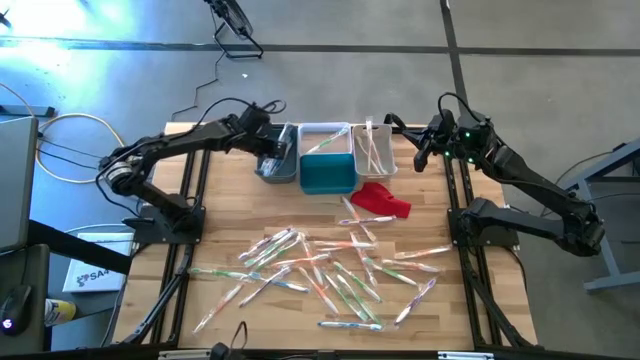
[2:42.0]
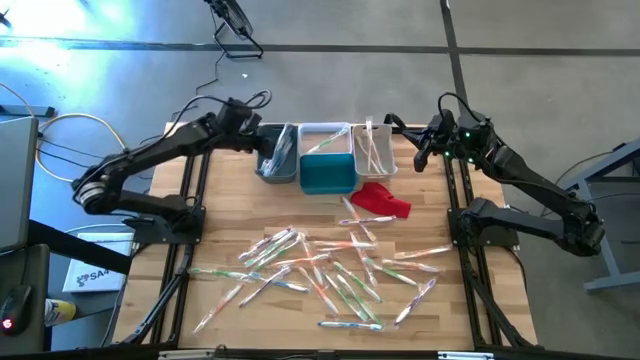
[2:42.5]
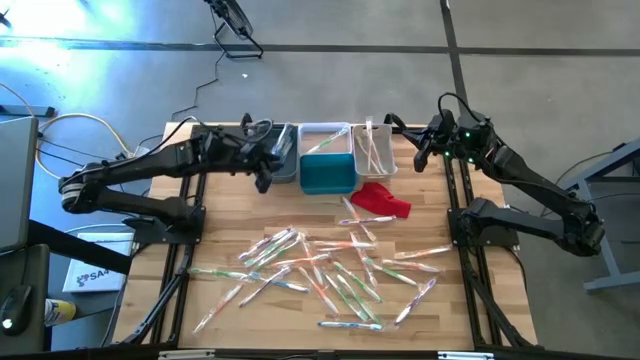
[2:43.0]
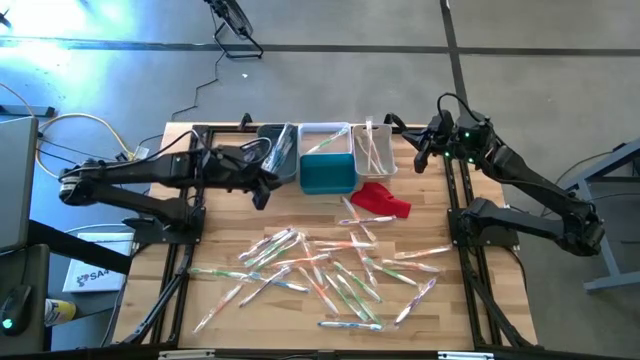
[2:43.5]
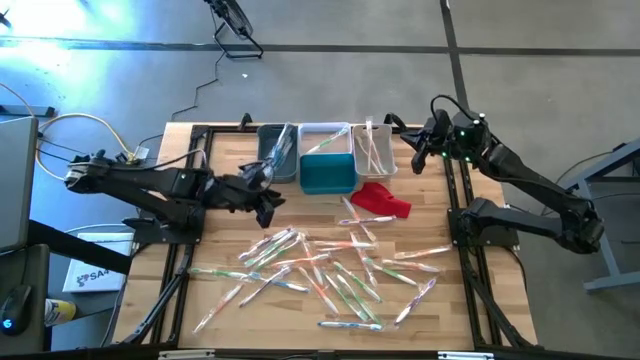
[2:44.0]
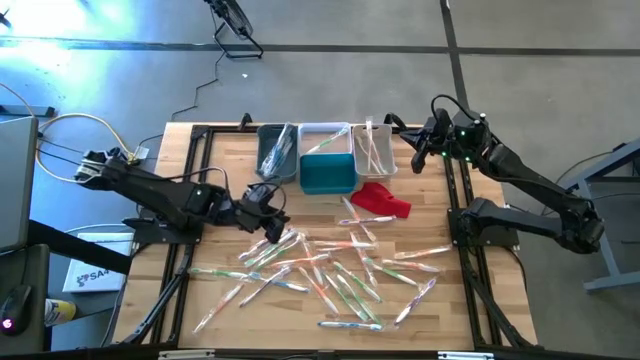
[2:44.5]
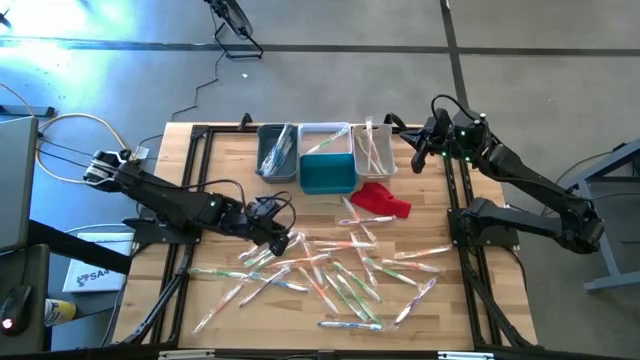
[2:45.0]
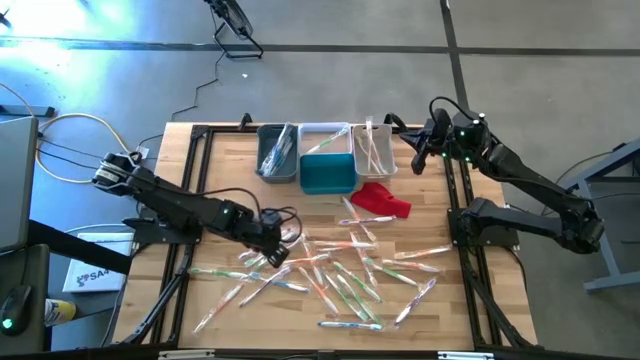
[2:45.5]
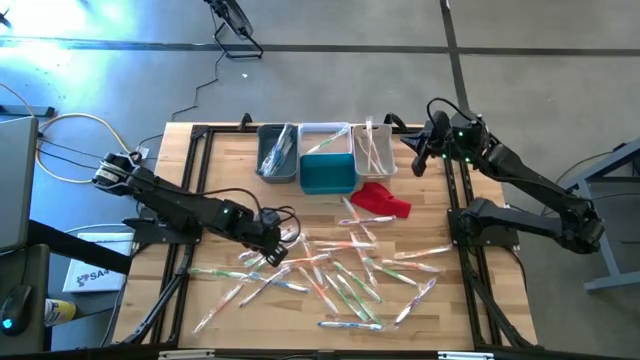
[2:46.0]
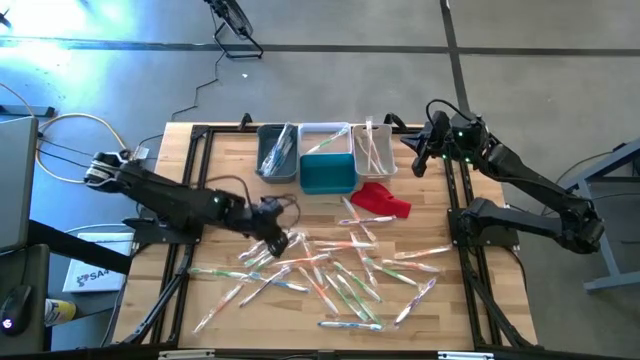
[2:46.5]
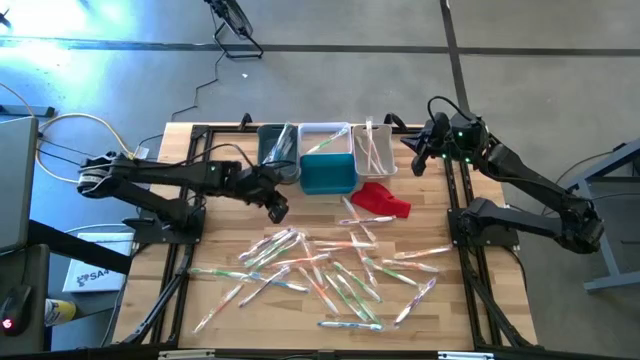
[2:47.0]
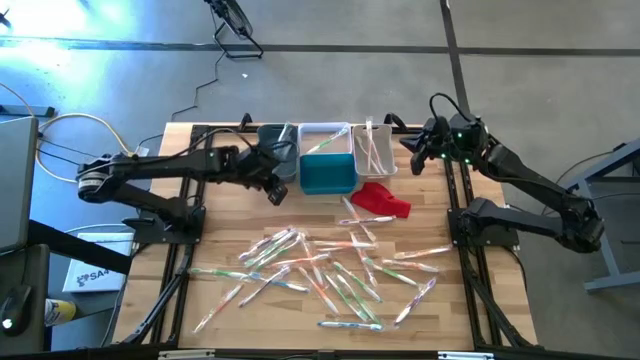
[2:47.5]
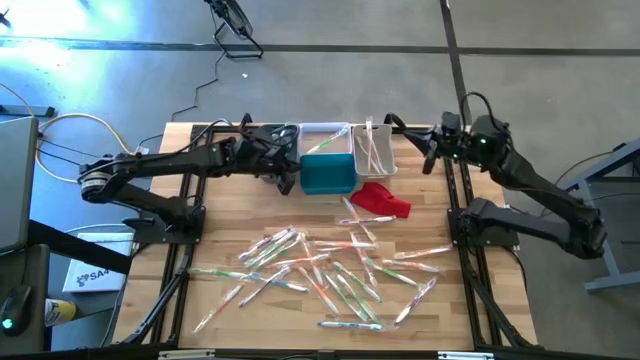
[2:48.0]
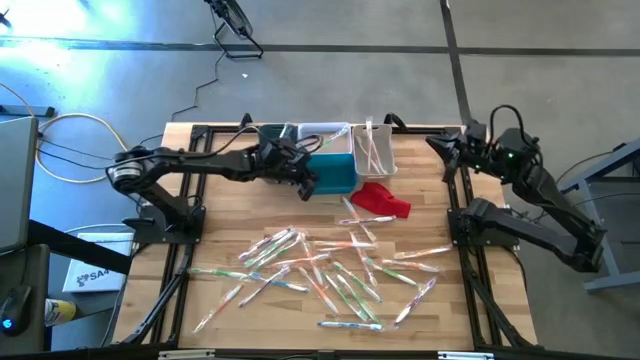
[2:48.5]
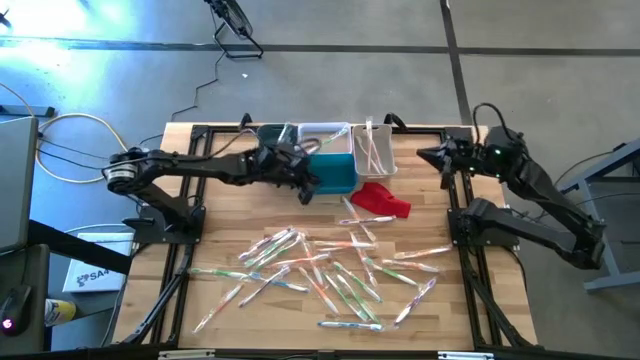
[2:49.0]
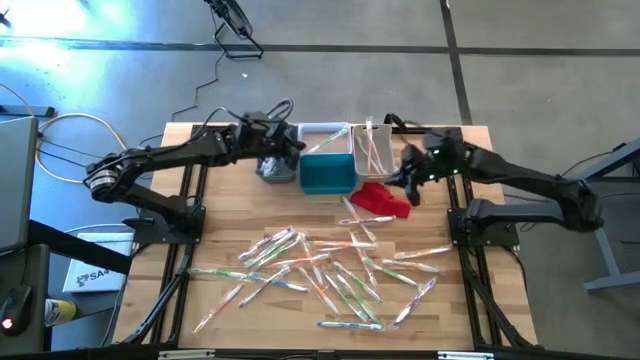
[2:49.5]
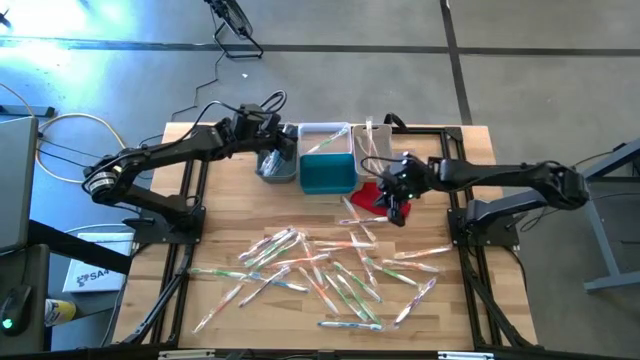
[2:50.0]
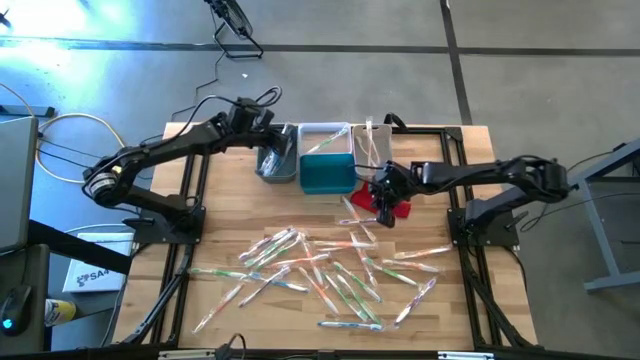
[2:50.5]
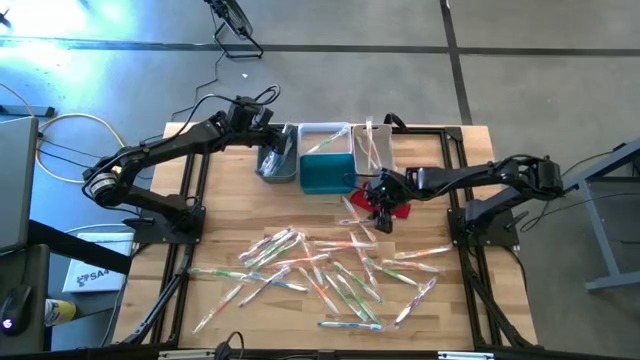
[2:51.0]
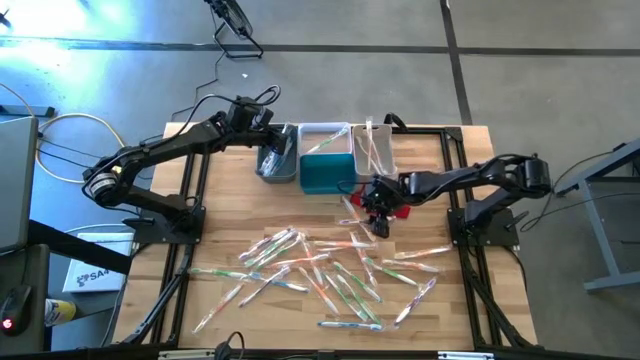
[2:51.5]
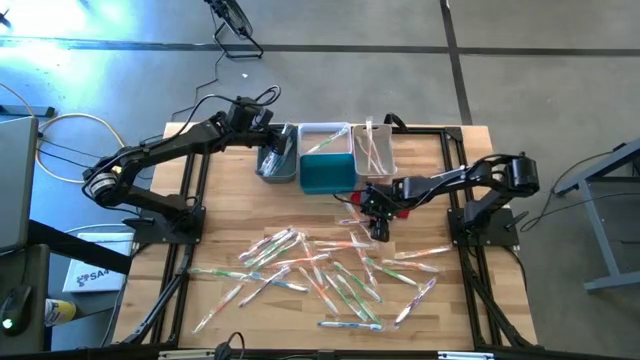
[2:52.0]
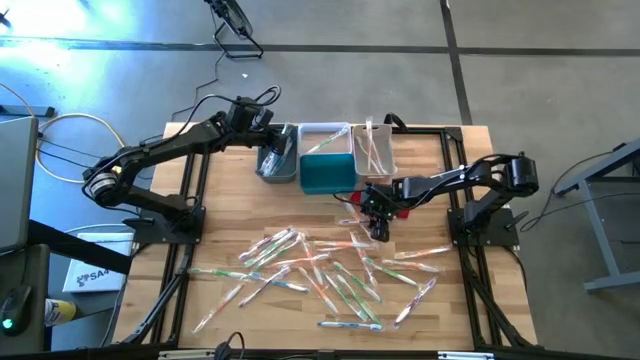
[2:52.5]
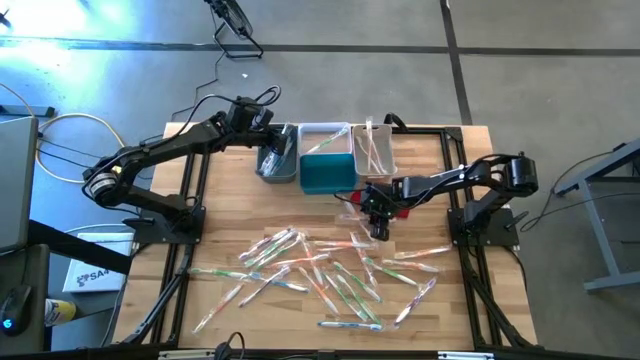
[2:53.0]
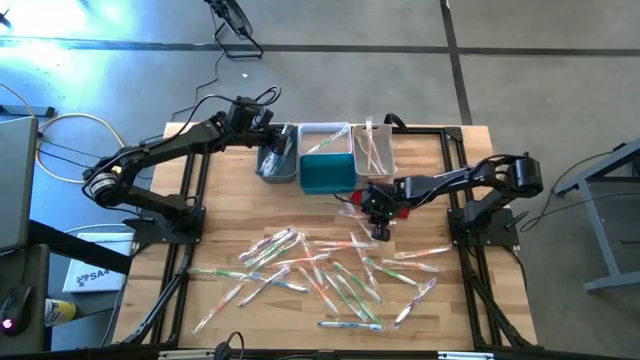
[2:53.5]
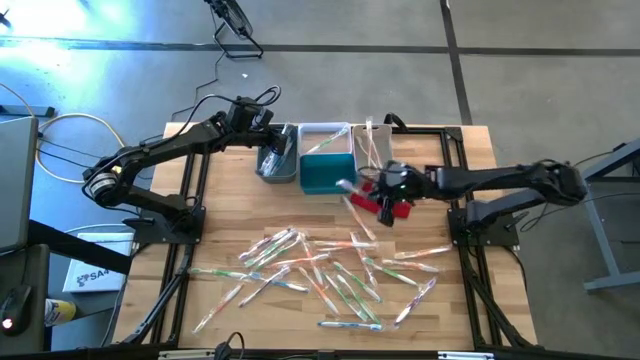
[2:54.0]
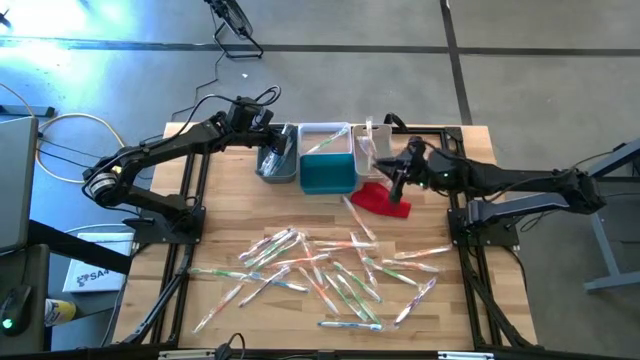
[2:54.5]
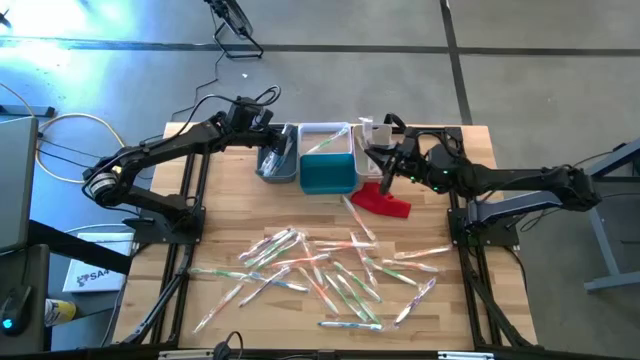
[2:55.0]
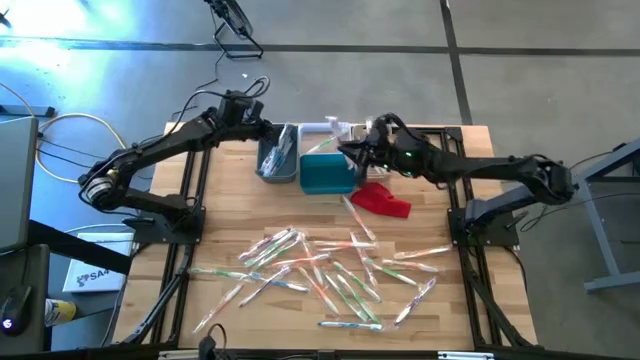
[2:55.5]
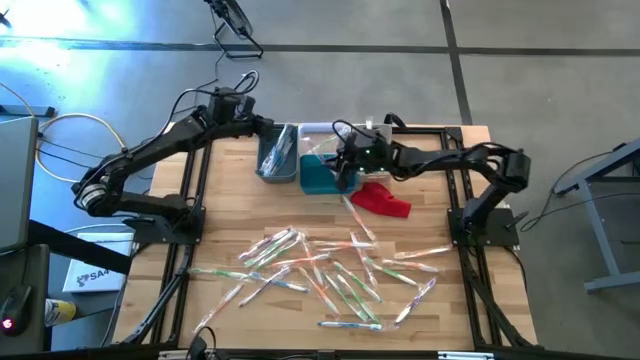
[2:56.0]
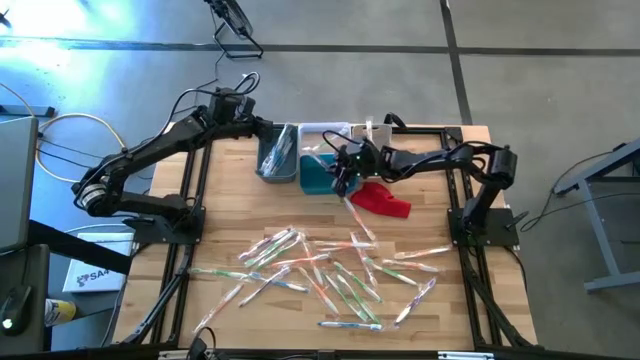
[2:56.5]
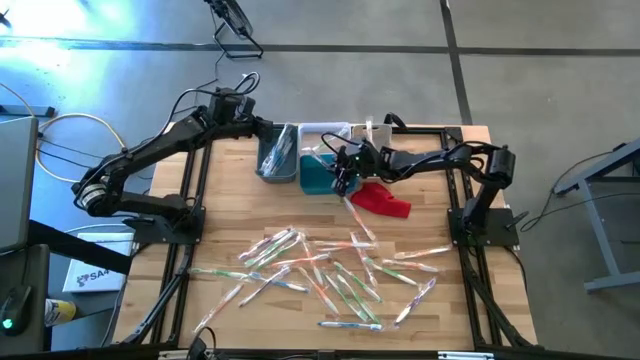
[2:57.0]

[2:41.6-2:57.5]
Task: Pick & Place Toothbrushes
Put the purple toothbrush into the blue bin

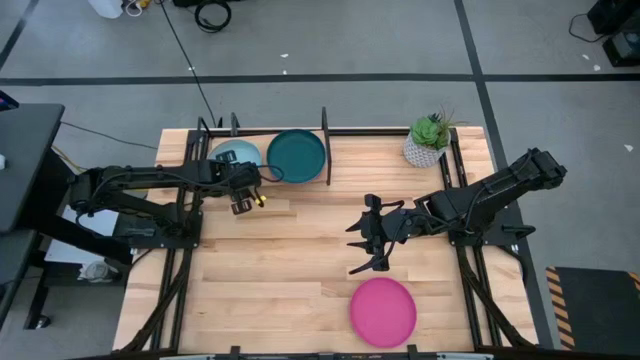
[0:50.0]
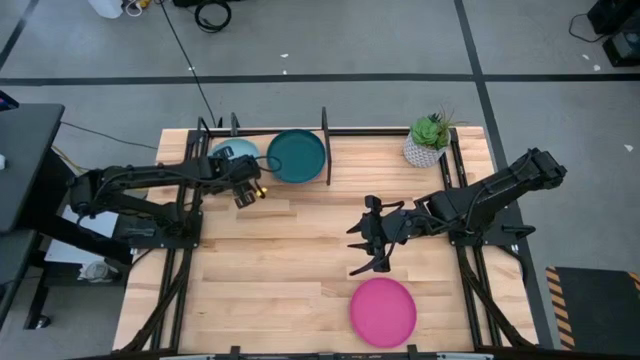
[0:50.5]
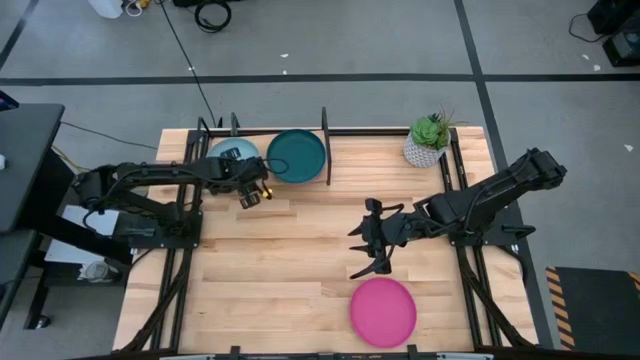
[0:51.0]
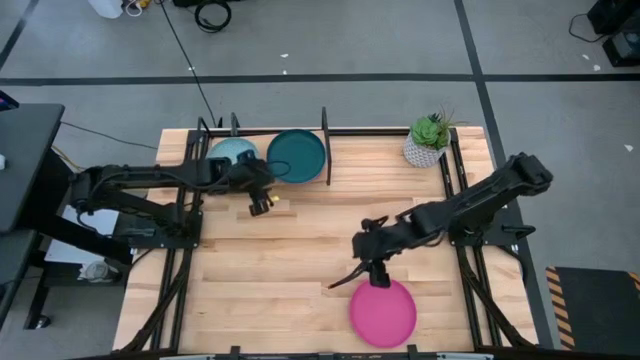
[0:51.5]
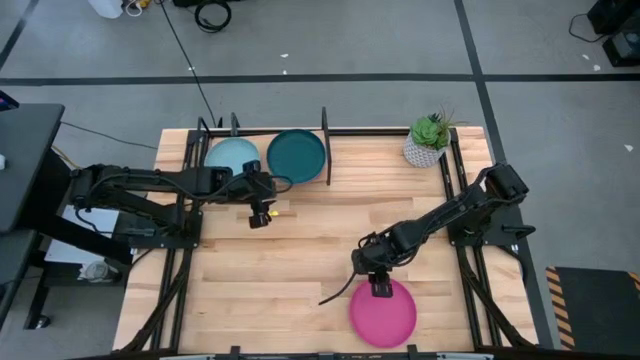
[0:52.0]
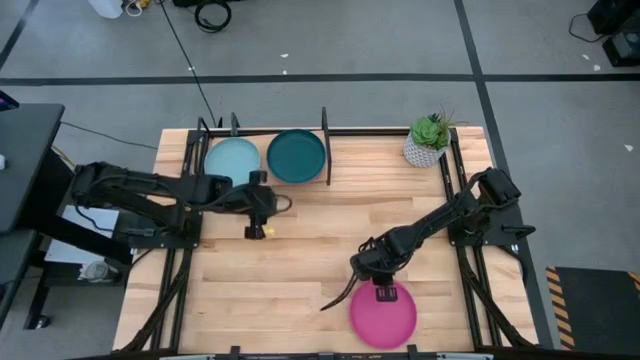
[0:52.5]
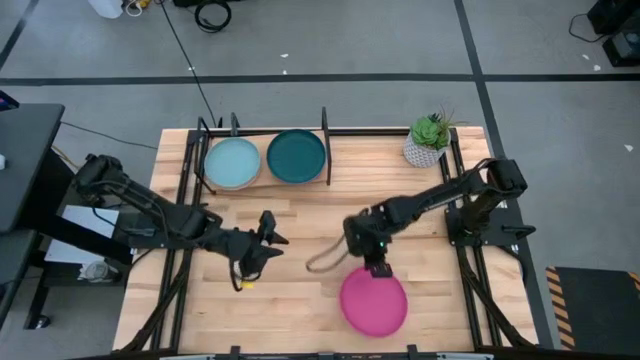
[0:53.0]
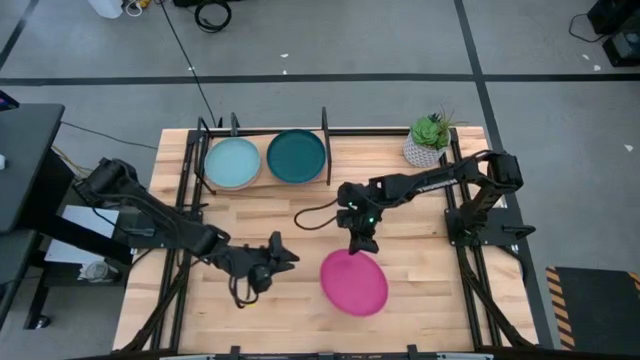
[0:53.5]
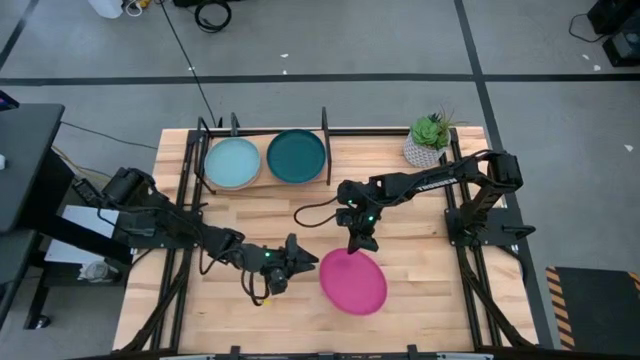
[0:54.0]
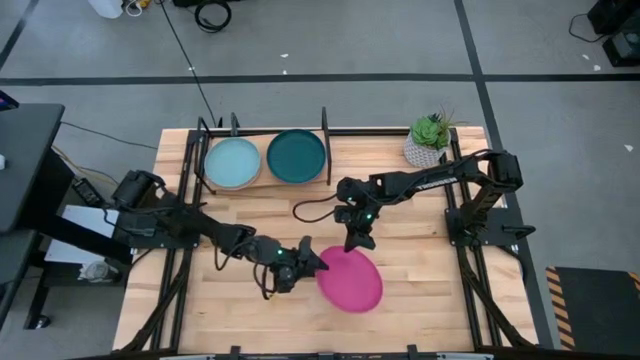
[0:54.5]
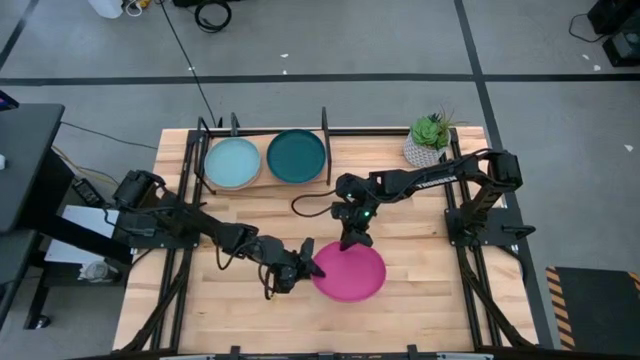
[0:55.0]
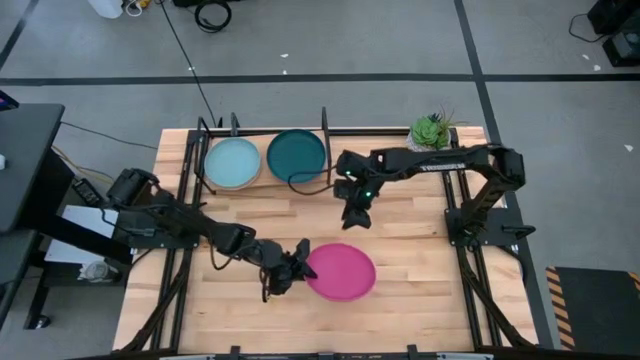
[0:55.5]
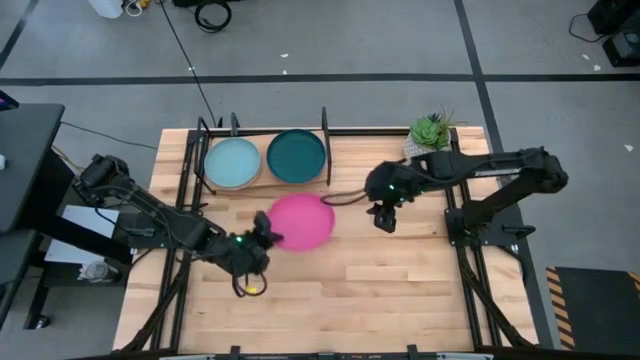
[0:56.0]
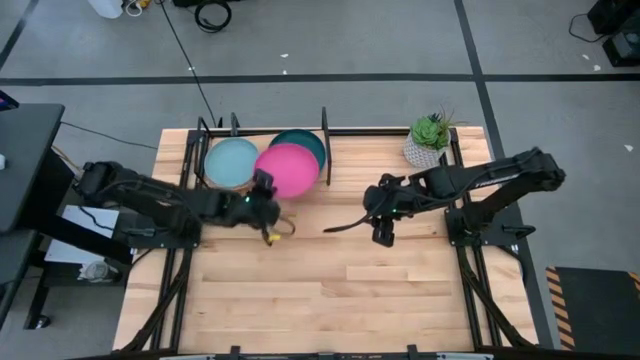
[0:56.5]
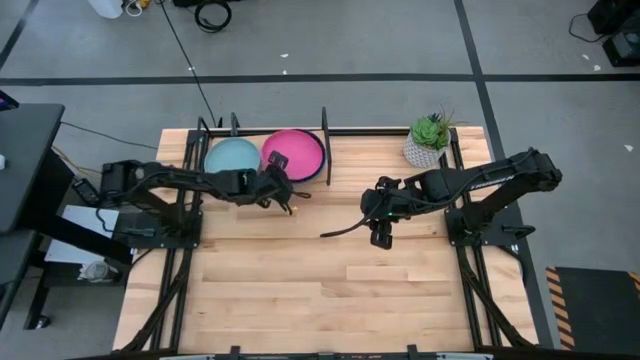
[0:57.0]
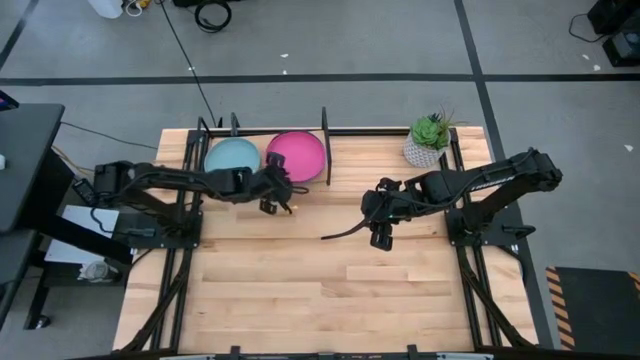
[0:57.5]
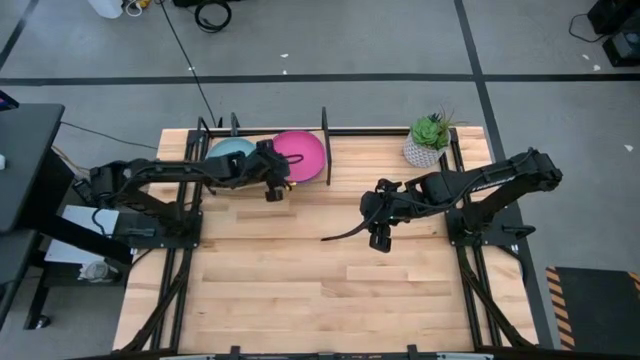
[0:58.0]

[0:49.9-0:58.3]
Task: Place and stack plates onto a shelf
Stack the pink plate on the green plate
